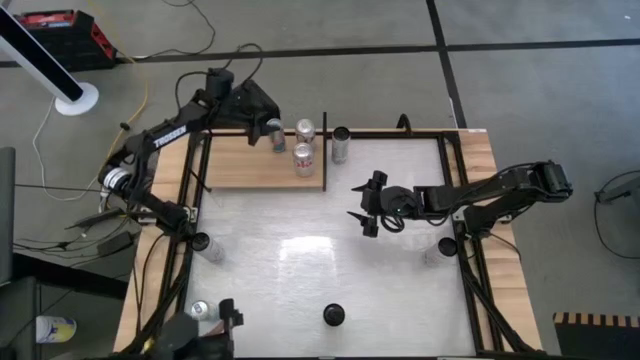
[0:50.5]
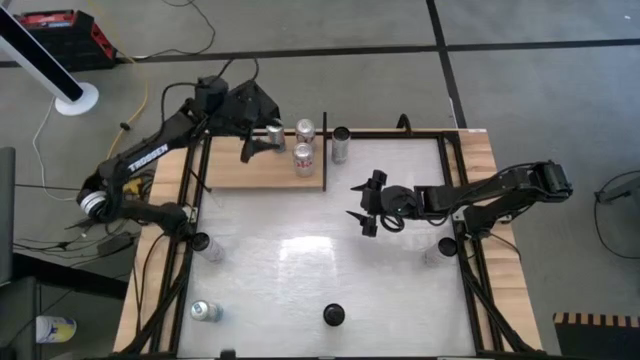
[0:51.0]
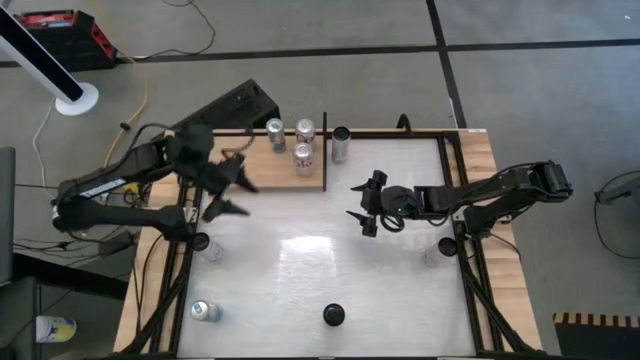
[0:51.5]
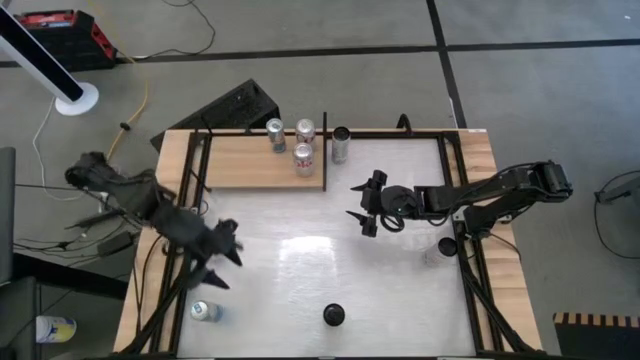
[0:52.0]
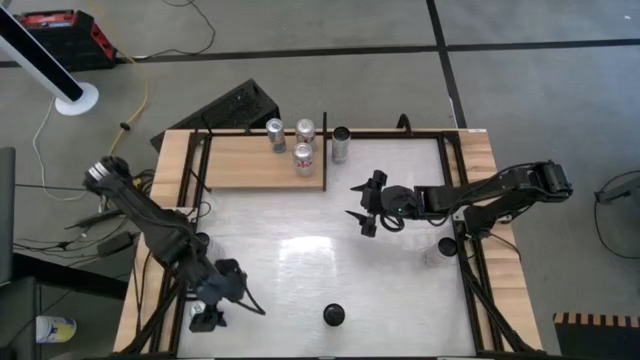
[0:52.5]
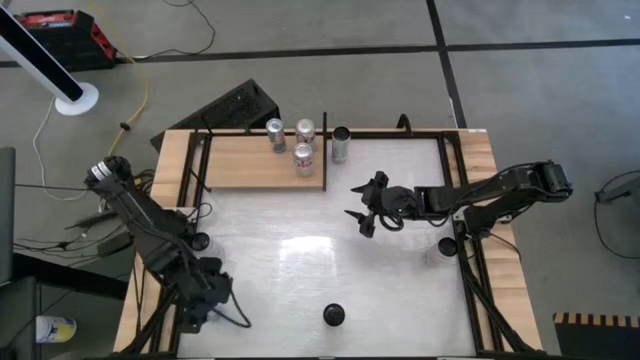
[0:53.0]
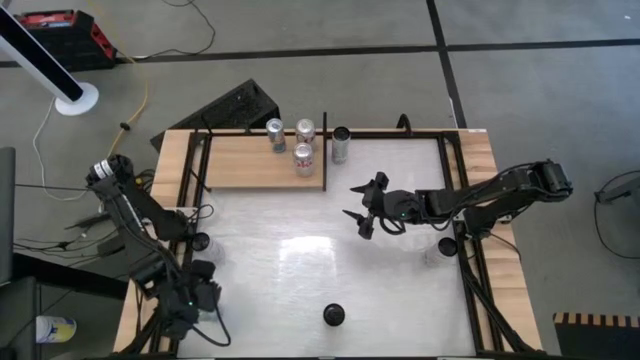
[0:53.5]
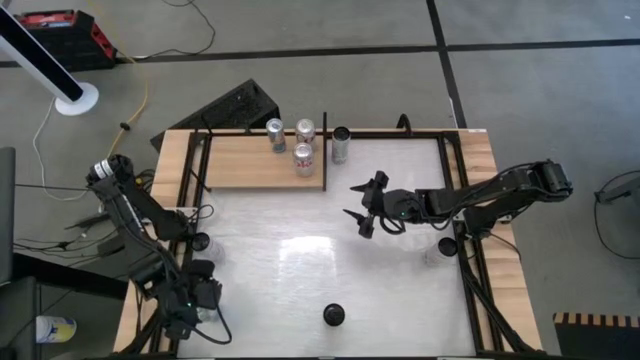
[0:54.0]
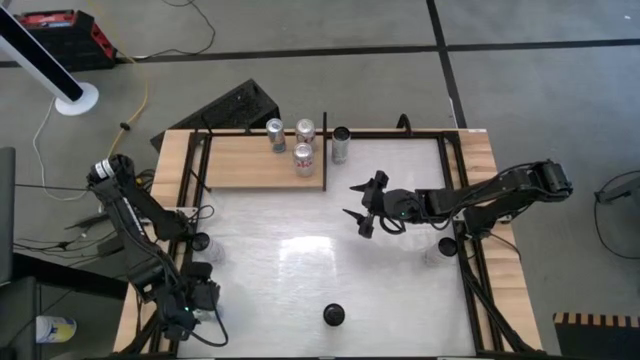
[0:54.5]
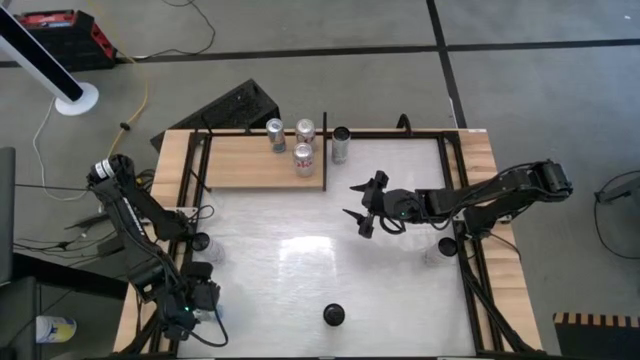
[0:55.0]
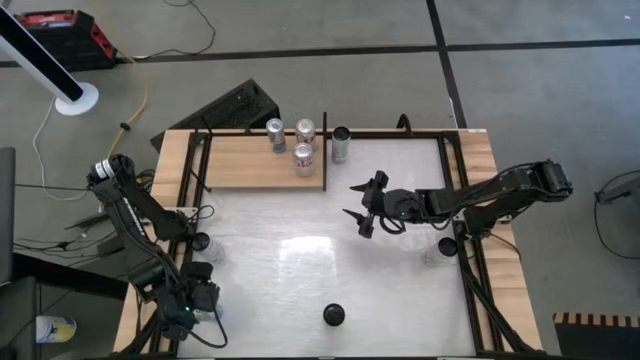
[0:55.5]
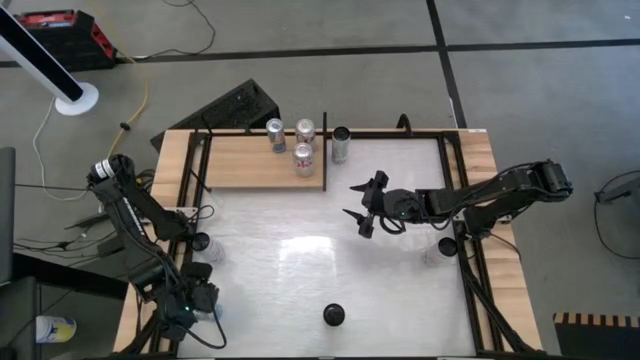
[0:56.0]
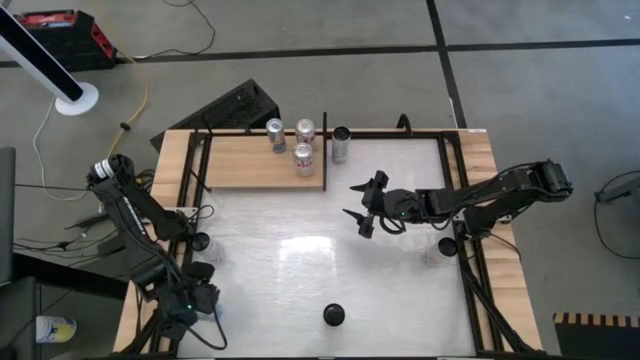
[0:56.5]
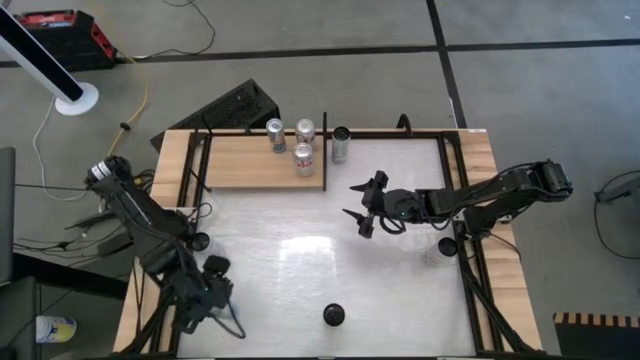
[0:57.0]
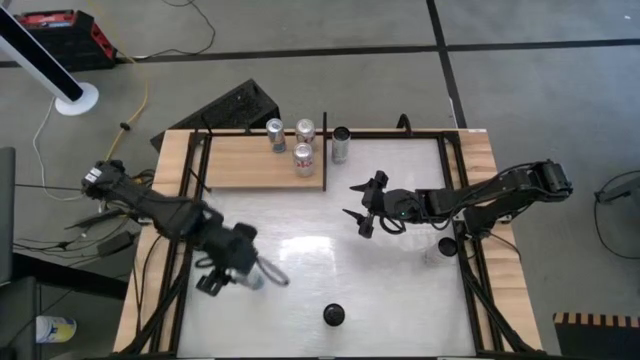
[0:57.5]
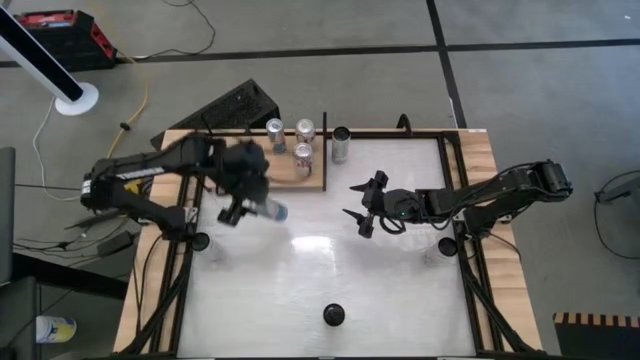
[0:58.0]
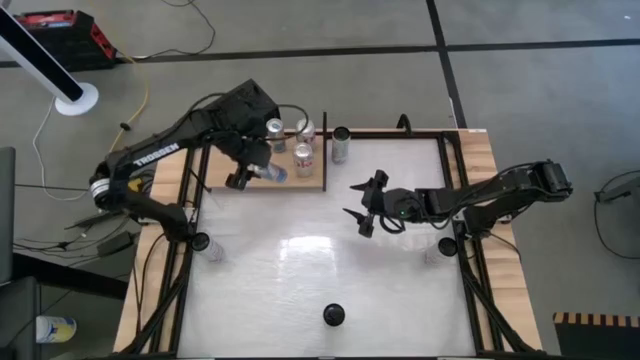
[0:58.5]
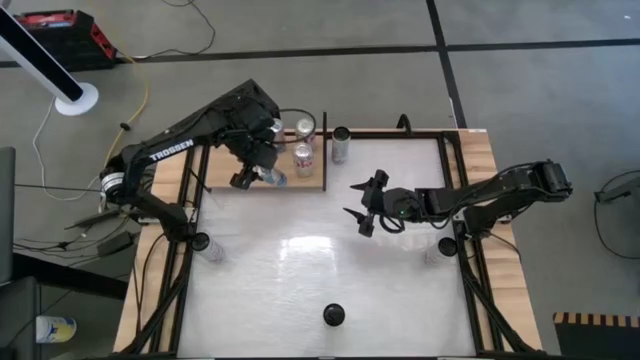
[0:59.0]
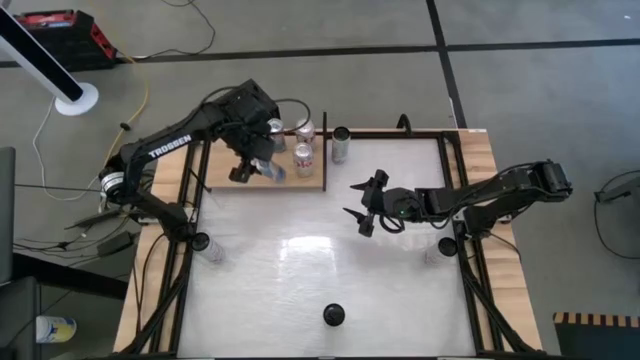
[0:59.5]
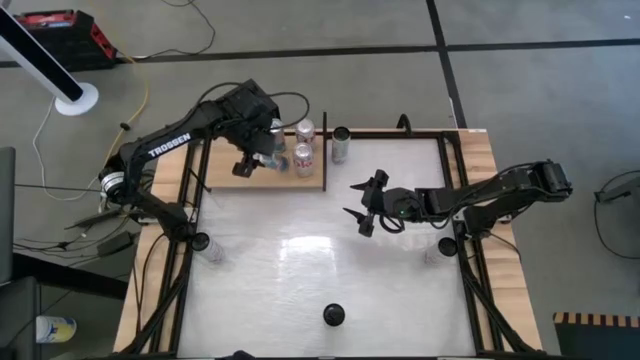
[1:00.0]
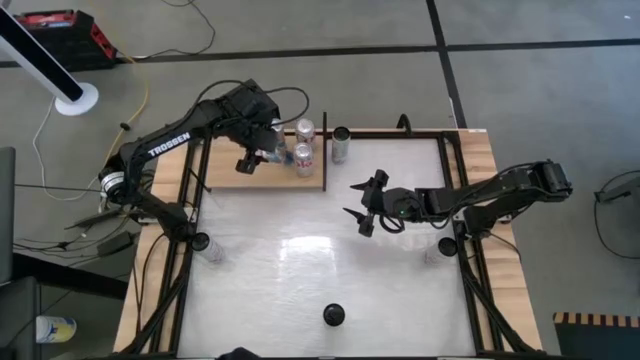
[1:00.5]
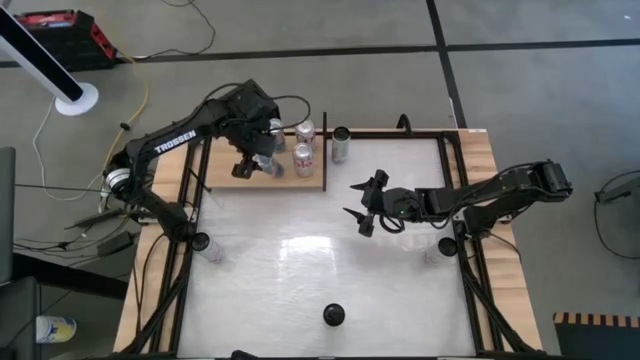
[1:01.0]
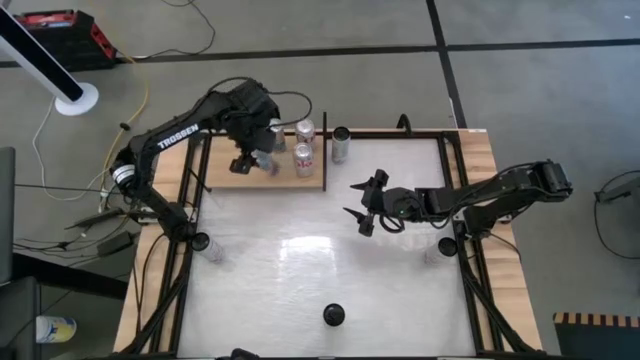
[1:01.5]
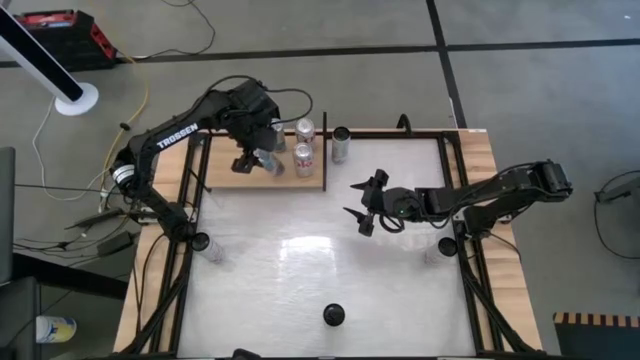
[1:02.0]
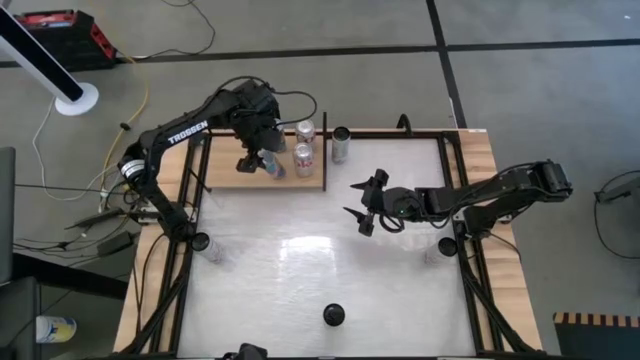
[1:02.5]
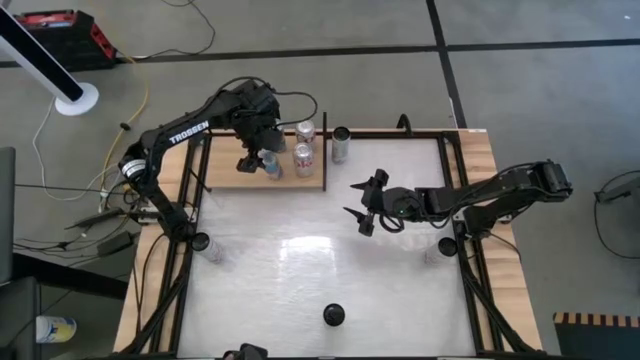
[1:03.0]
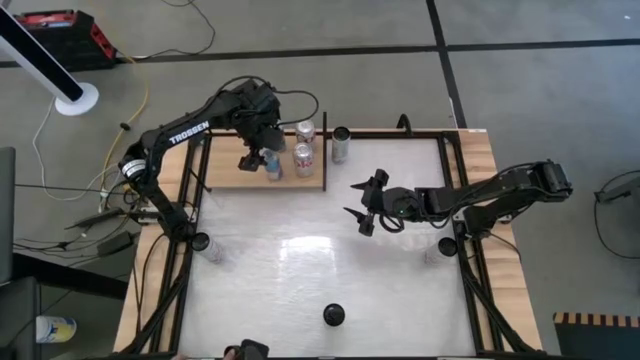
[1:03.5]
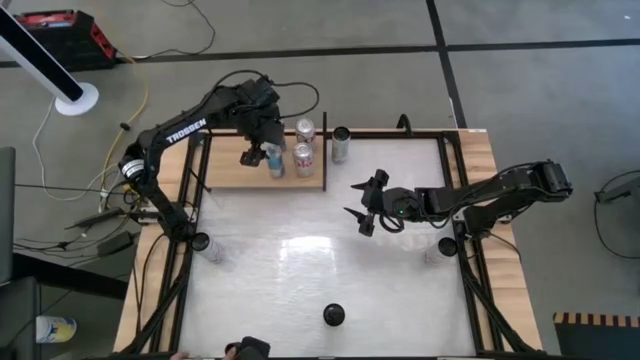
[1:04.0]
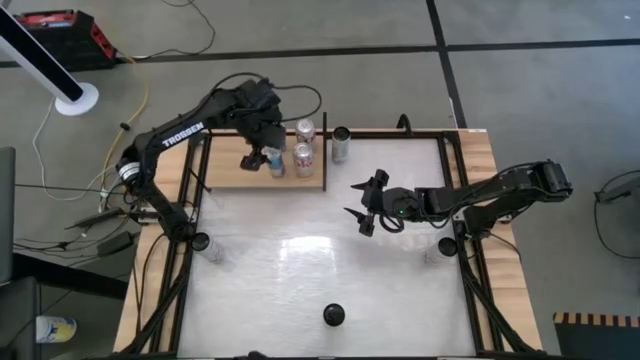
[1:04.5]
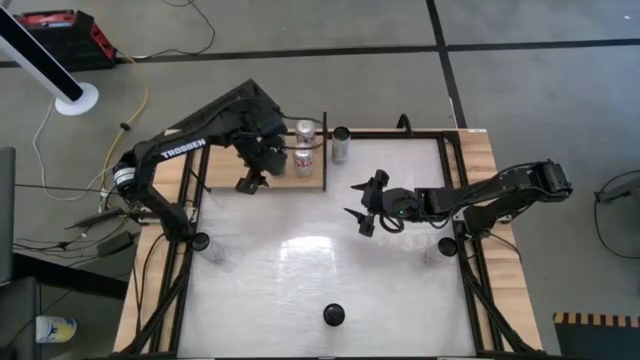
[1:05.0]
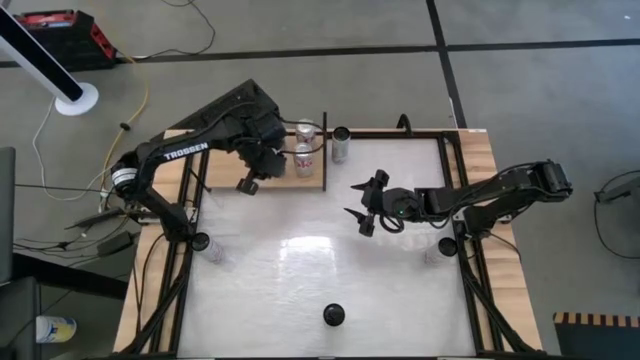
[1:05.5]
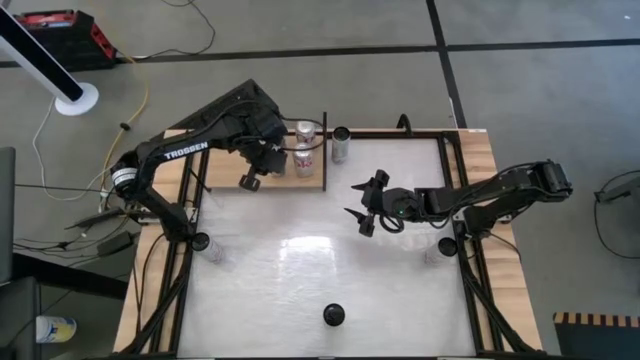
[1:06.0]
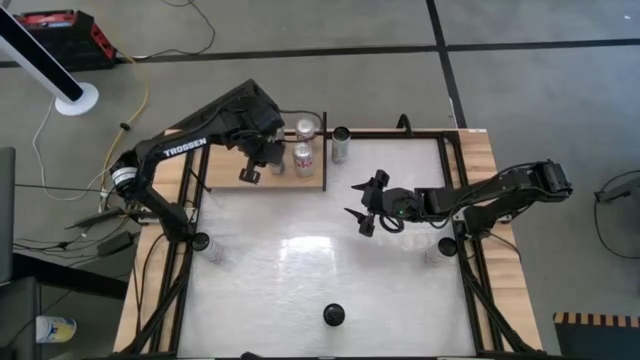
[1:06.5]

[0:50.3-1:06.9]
Task: Place canned beverage on shelf
Put the blue soda can on the shelf aligned with the other blue soda can

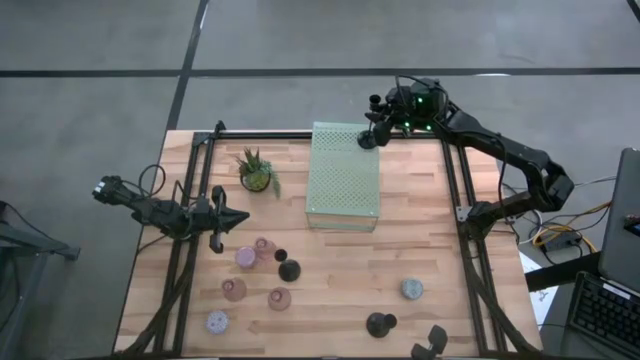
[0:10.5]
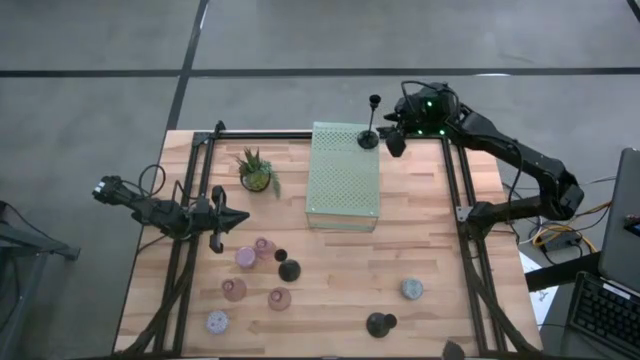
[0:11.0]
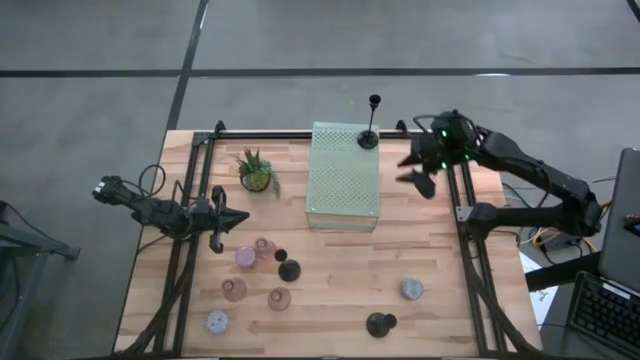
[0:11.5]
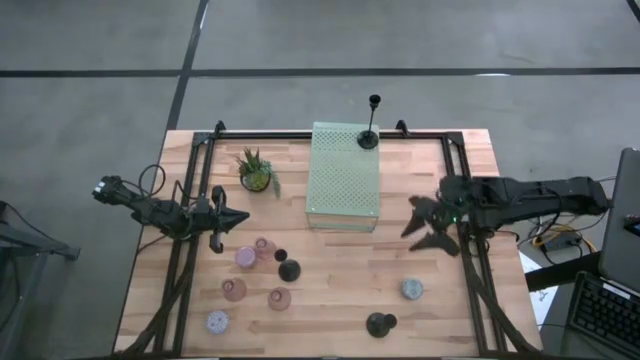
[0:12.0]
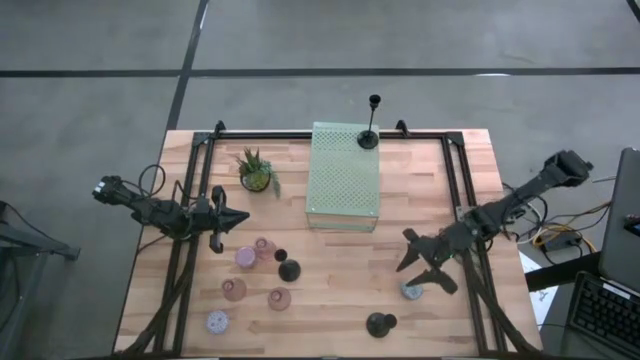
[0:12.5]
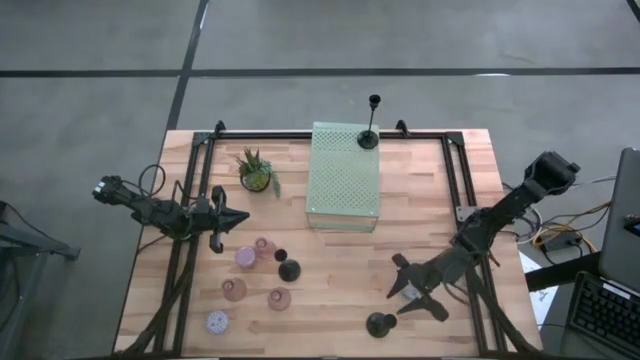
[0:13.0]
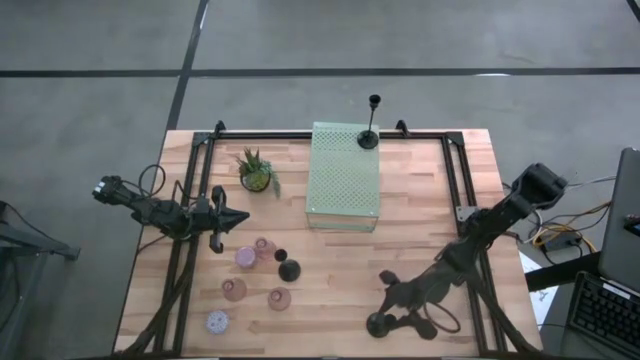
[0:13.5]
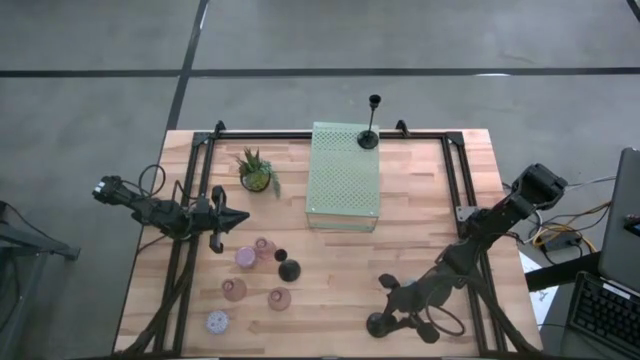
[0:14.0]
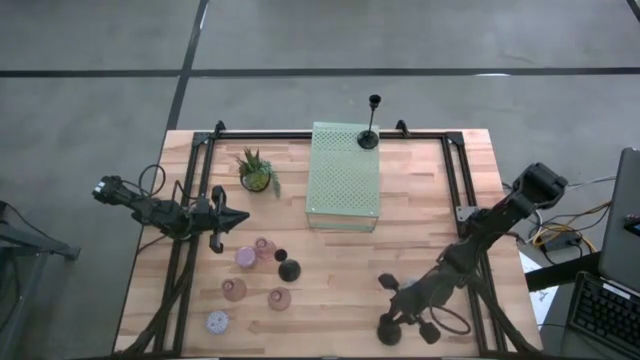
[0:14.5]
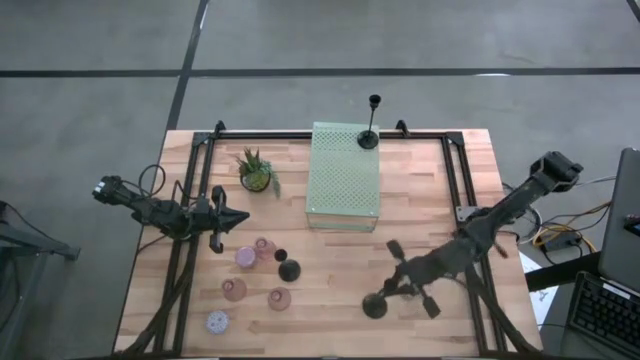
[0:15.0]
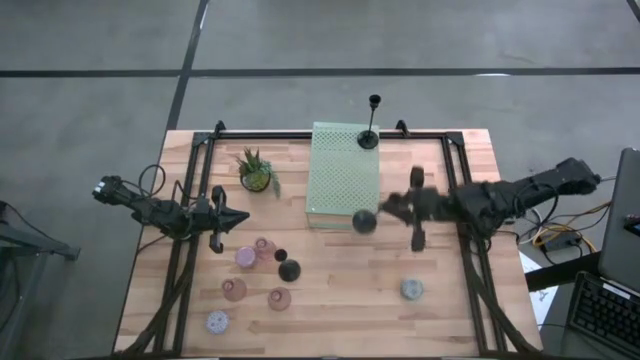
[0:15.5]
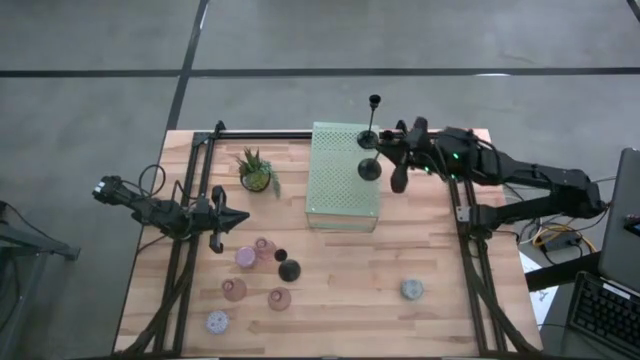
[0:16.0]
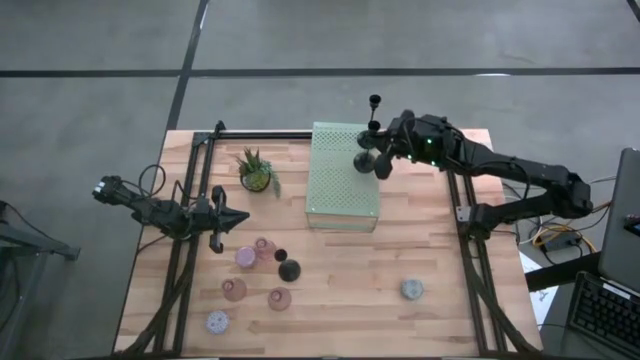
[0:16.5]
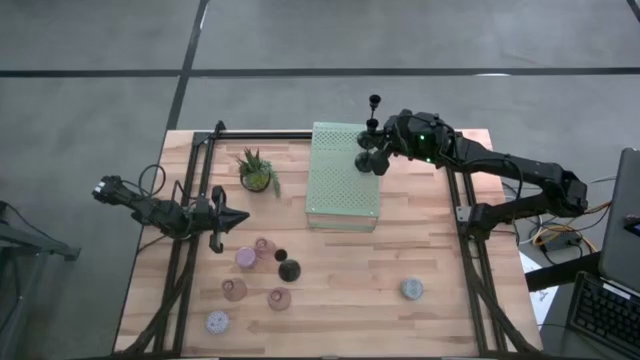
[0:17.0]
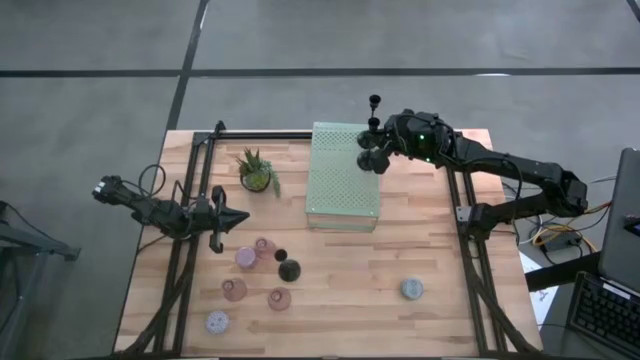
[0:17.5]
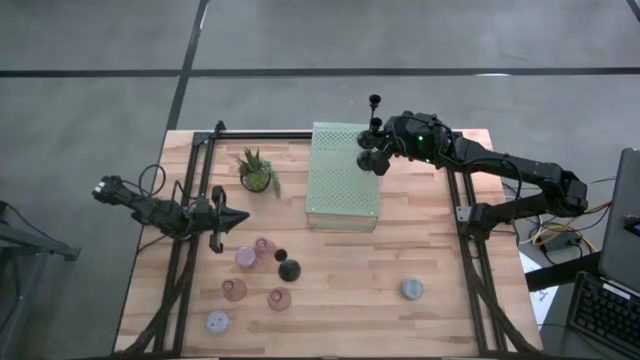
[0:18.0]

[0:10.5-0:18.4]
Task: Pick & Place candle stick holders
Put the bottom black candle holder on the shelf aligned with the other black candle holder
